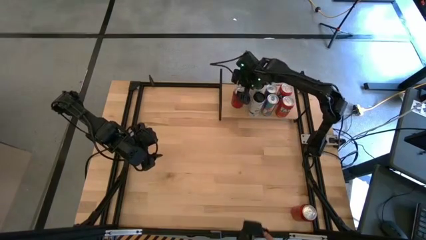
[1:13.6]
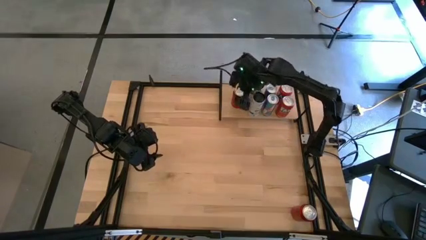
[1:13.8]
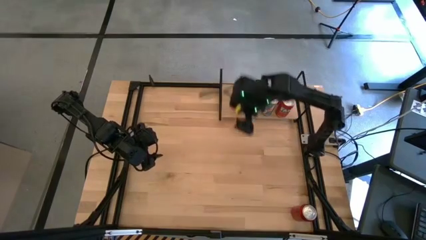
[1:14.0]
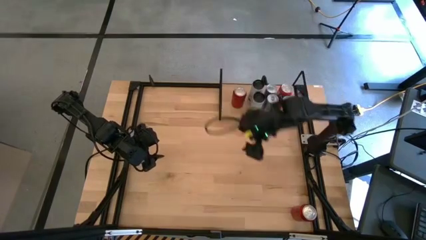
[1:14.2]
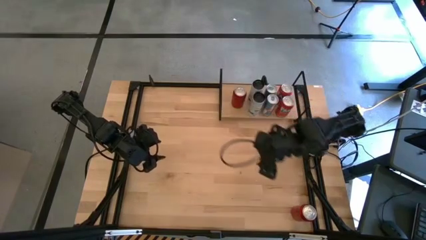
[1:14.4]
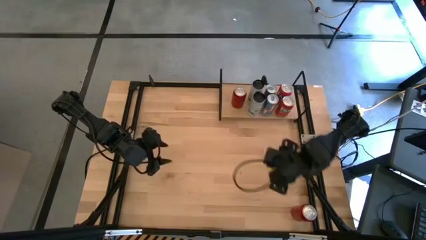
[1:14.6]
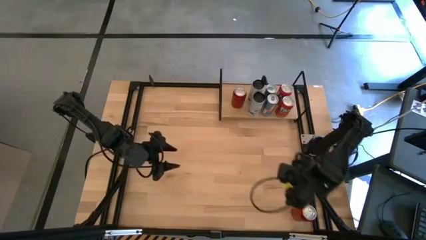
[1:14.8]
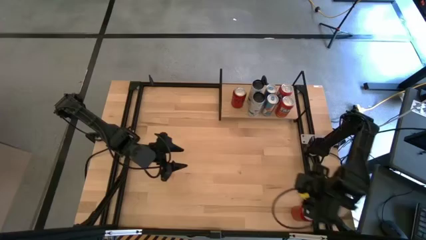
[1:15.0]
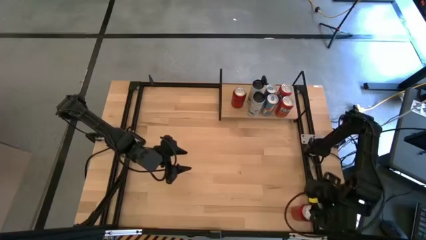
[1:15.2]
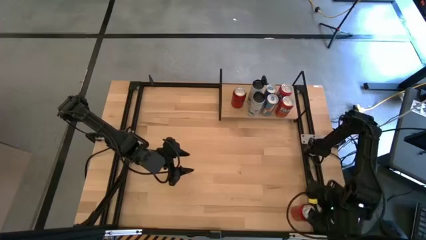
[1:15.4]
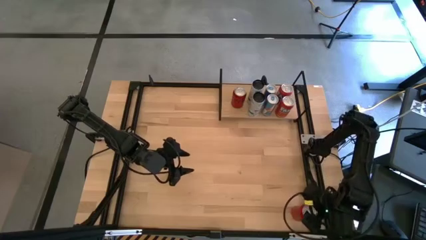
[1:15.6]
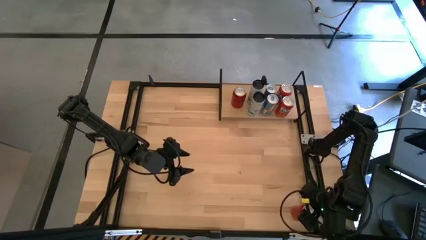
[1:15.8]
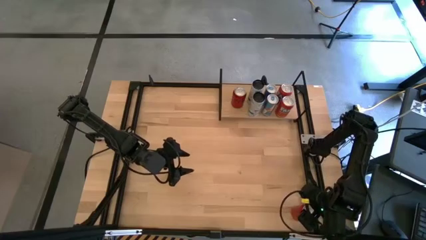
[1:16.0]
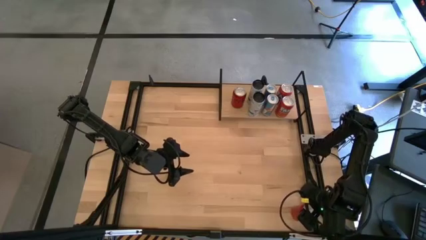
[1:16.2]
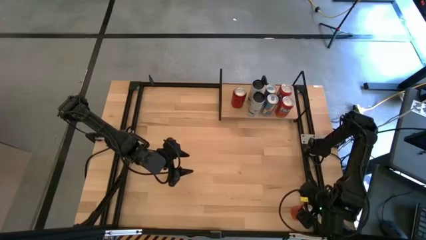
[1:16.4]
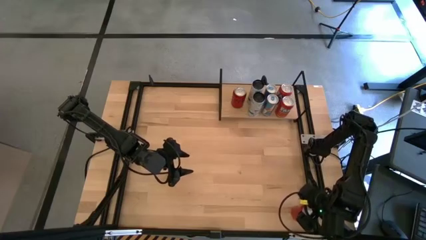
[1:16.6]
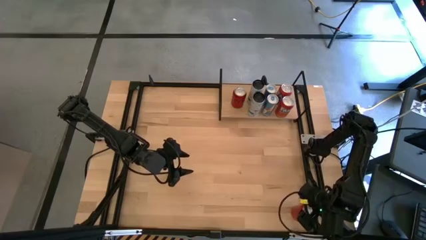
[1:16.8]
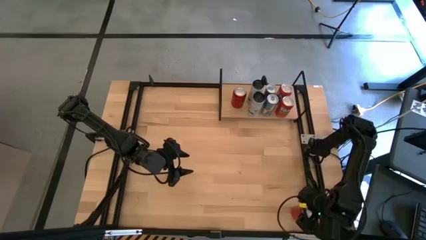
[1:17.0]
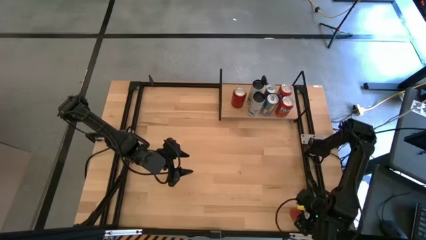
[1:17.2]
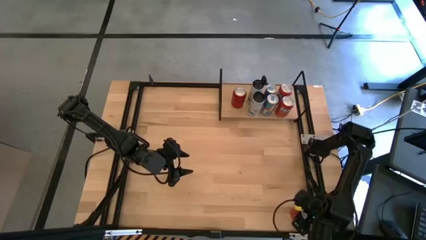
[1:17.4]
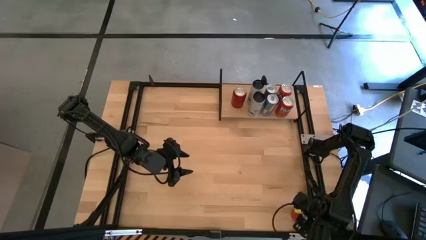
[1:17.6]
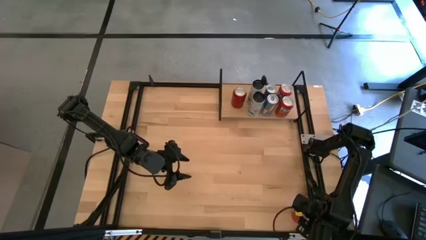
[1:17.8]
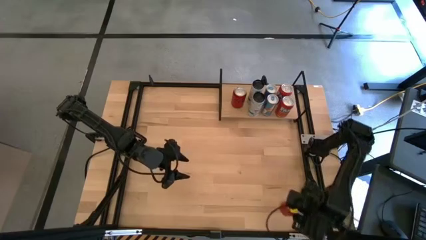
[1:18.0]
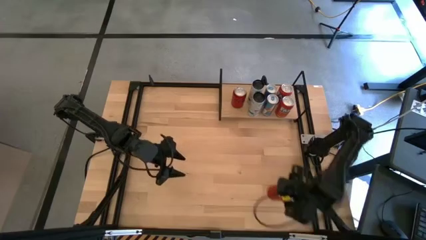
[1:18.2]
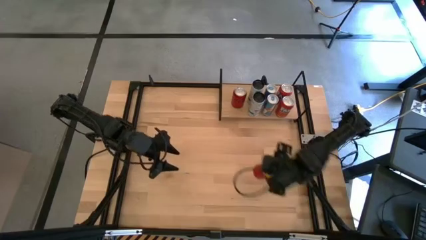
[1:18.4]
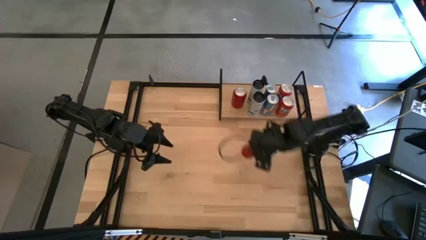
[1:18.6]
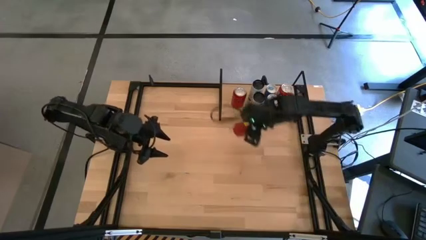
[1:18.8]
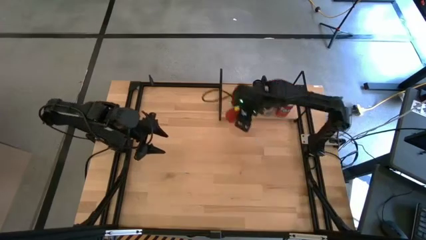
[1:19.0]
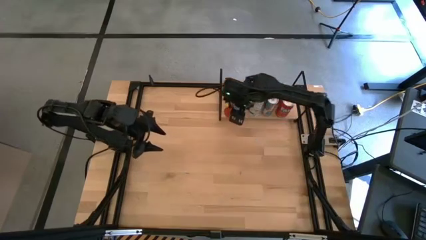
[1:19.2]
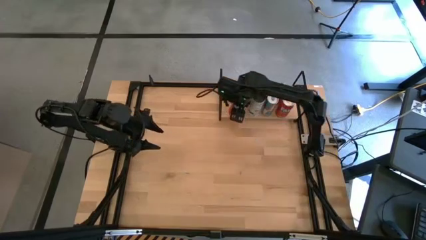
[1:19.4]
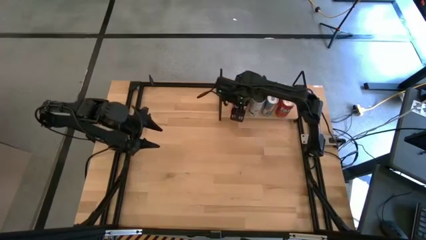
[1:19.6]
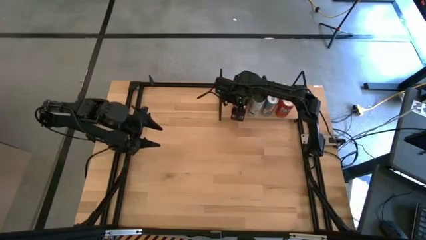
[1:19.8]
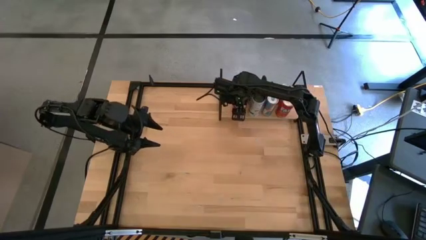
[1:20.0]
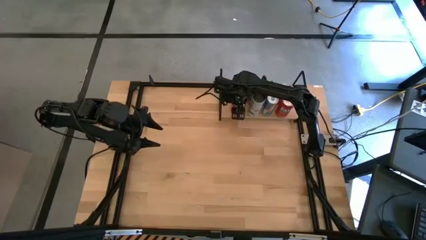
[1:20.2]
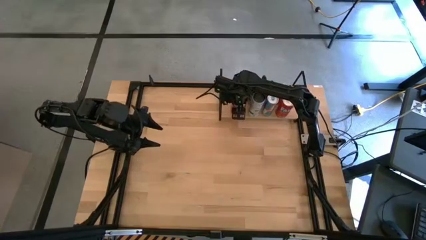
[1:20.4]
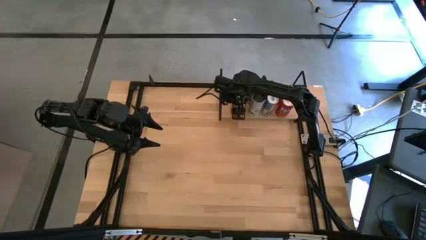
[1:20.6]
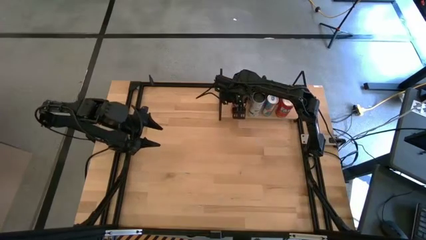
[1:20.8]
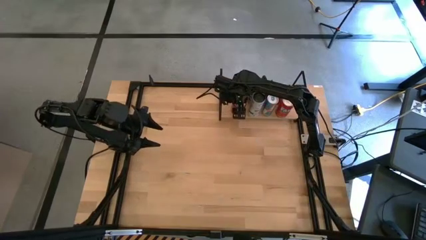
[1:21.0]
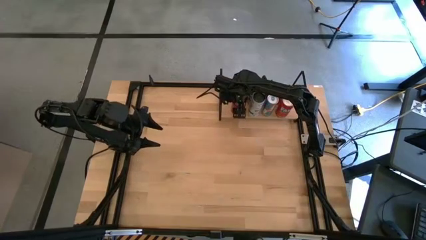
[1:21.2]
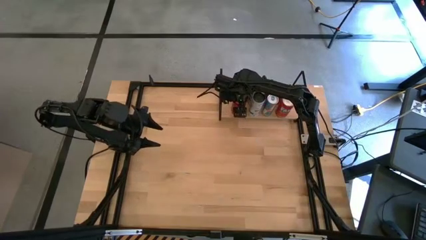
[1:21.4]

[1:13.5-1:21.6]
Task: Place canned beverage on shelf
Put the red soda can on the shelf aligned with the other red soda can

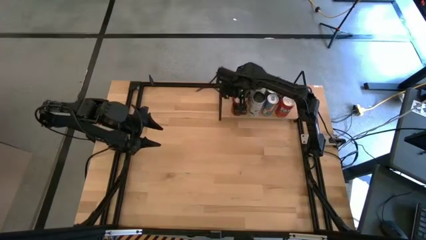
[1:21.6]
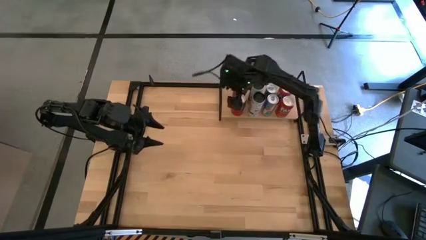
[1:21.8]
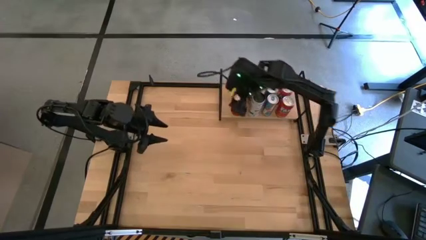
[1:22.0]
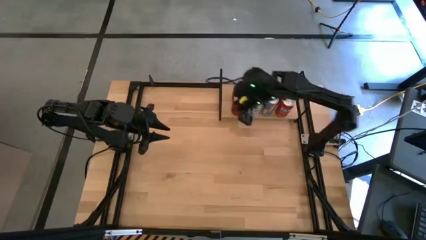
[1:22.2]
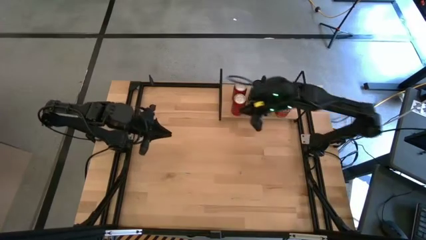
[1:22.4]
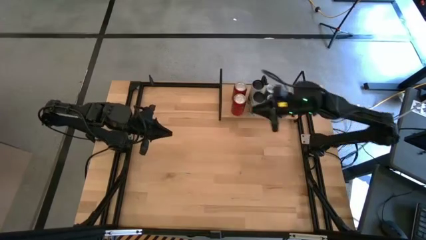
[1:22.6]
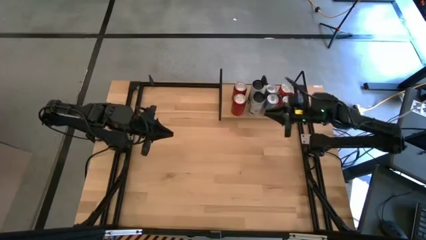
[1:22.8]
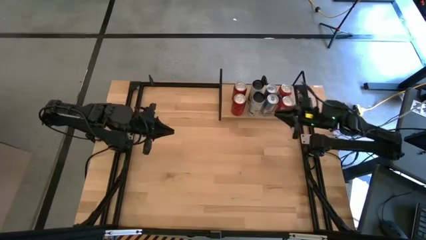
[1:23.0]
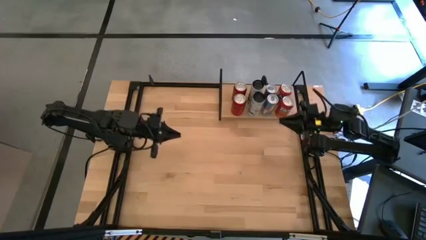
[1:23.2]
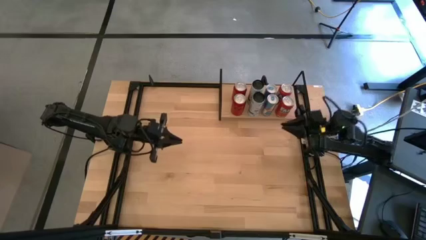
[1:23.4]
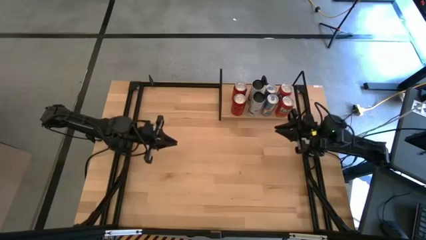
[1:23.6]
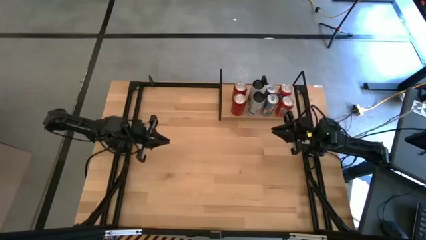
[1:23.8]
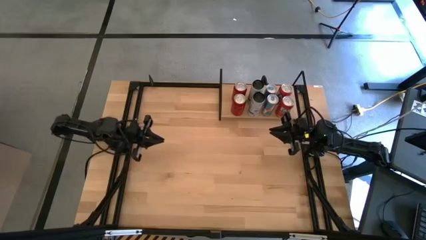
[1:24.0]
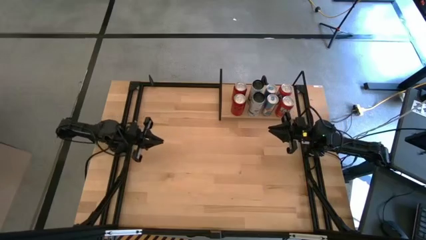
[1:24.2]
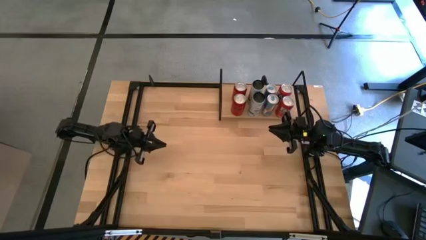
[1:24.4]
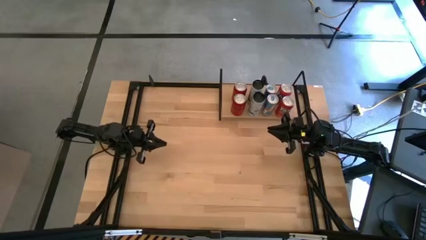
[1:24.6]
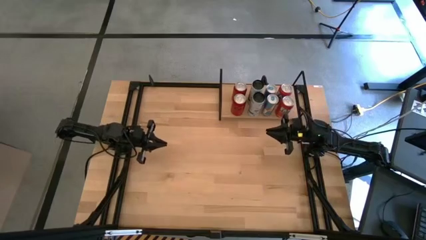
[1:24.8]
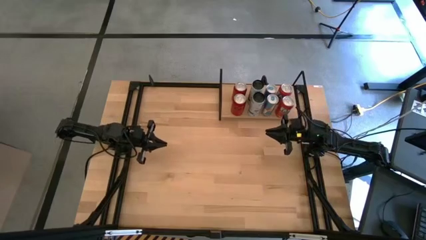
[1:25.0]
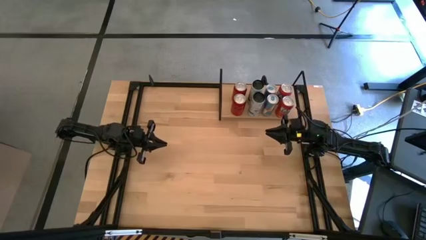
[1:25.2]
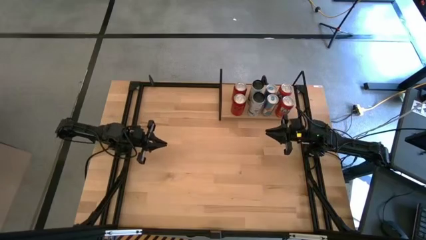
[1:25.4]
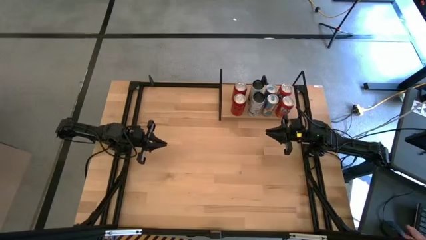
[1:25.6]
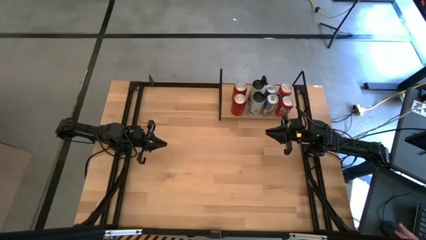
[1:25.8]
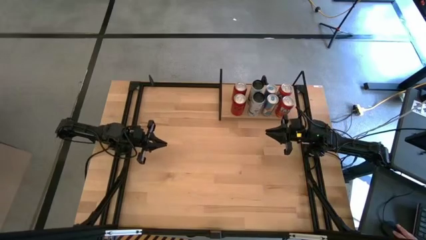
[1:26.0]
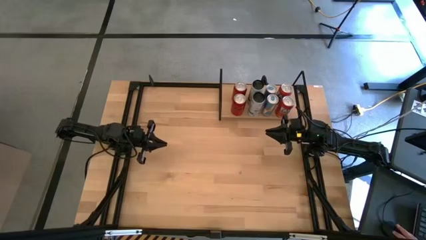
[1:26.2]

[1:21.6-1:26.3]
Return to Home Position

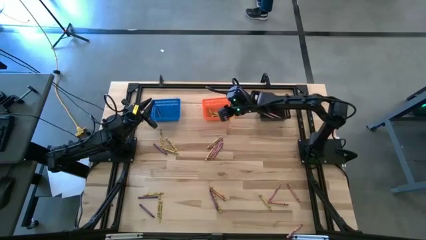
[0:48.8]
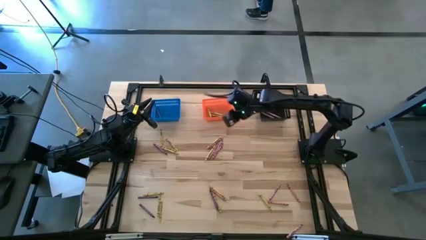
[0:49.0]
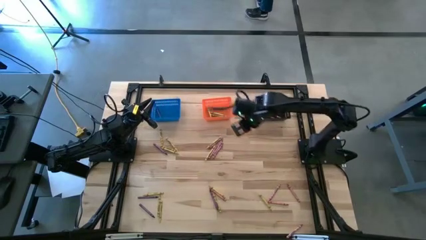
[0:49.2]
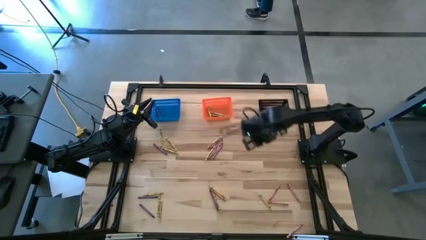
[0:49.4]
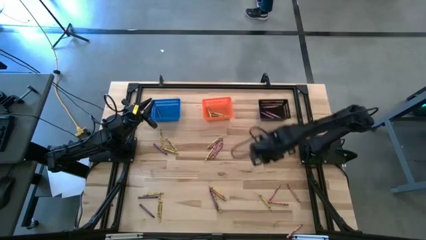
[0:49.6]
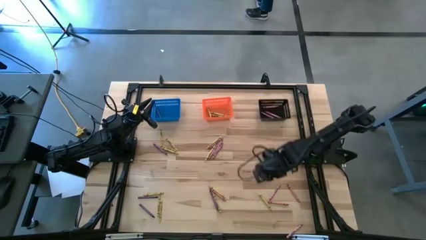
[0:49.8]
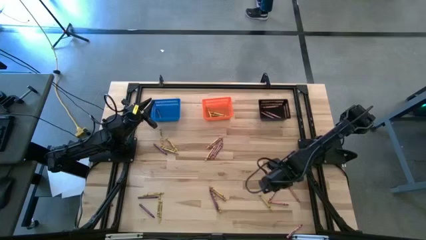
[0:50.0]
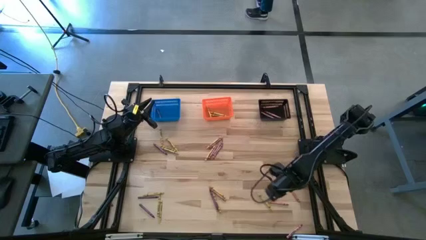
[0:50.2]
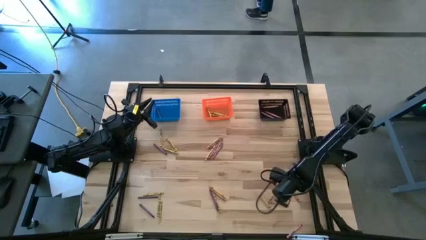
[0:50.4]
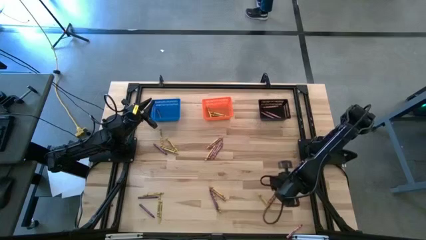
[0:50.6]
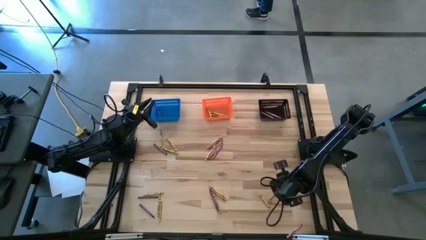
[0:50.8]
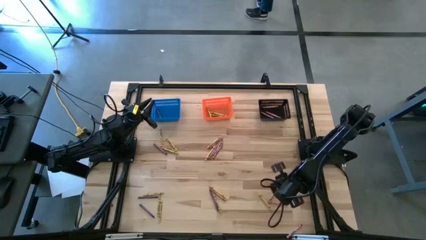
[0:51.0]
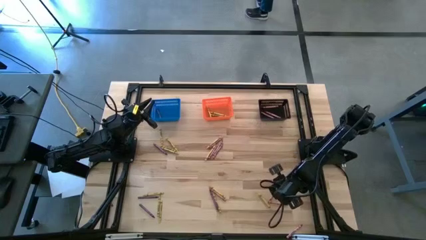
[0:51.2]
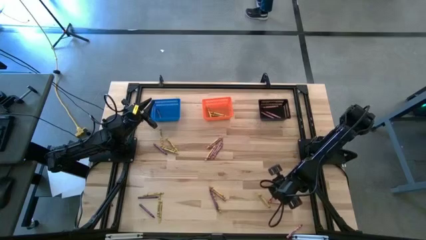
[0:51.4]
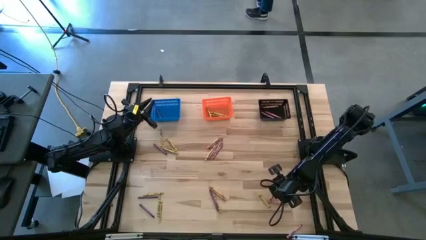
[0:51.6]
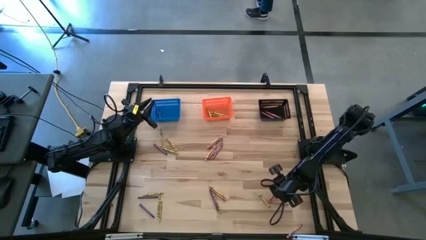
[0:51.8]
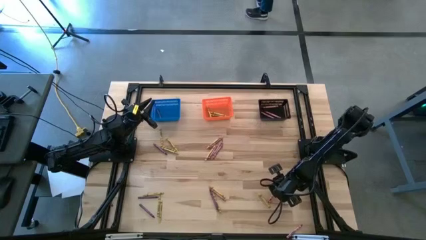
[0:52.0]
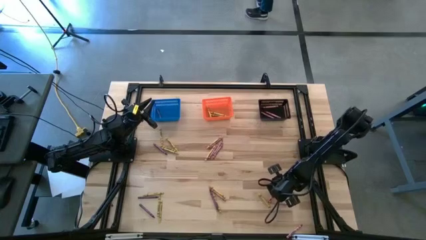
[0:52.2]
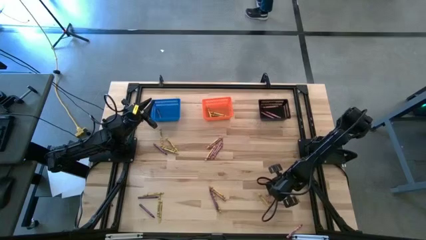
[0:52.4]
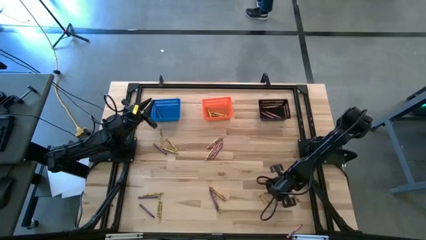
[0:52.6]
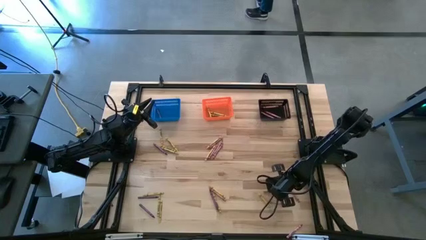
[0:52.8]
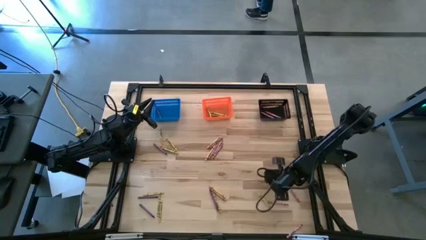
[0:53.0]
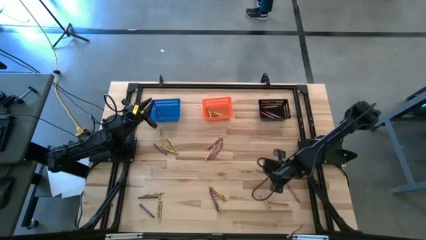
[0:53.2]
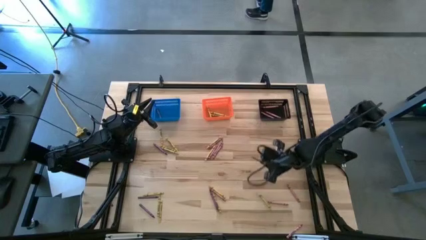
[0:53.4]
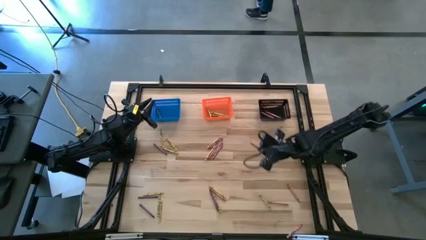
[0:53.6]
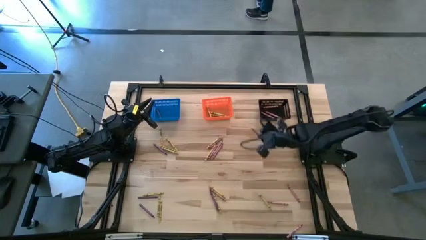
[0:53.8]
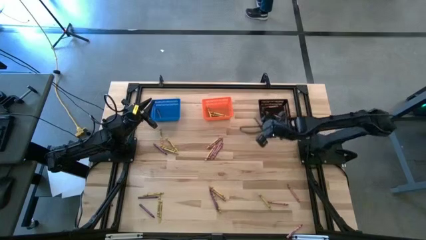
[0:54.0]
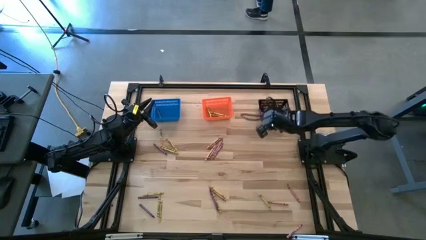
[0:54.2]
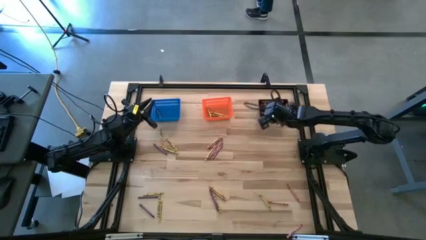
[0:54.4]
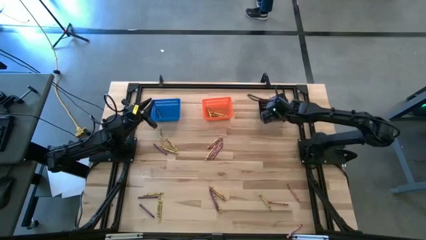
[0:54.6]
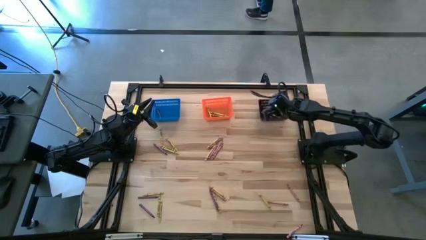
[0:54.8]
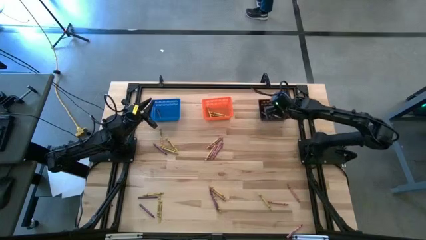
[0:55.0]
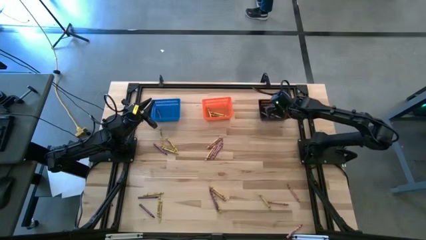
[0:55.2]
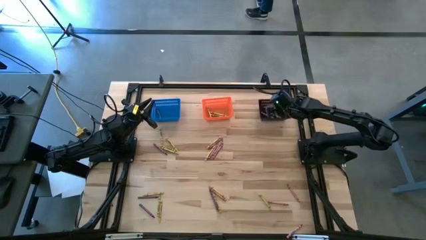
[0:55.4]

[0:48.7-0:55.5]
Task: Sort crayons
Put the red crayon into the black bin
